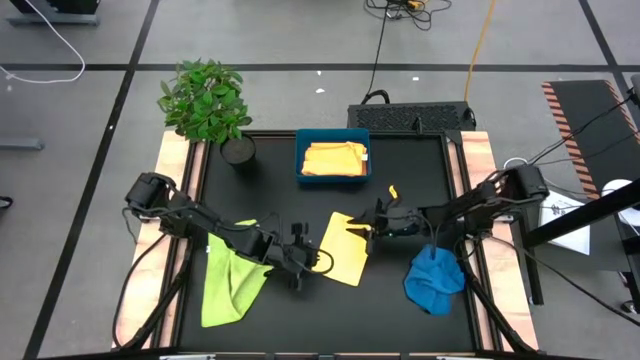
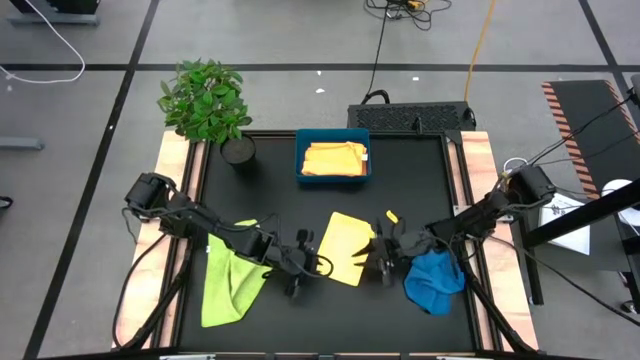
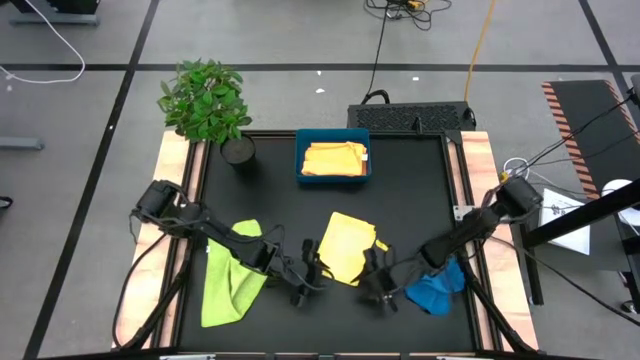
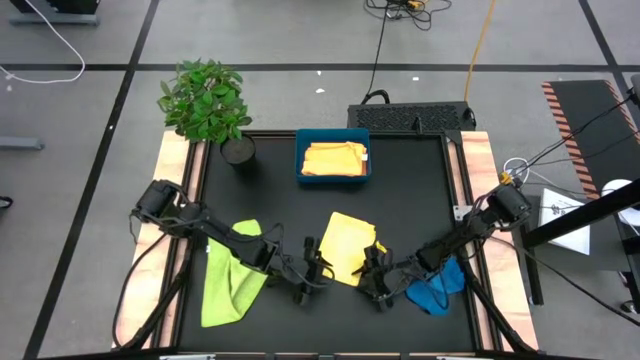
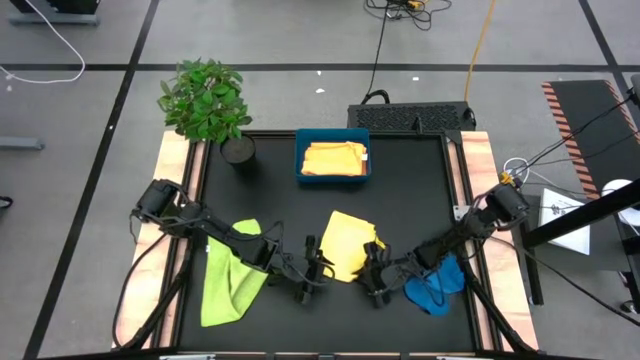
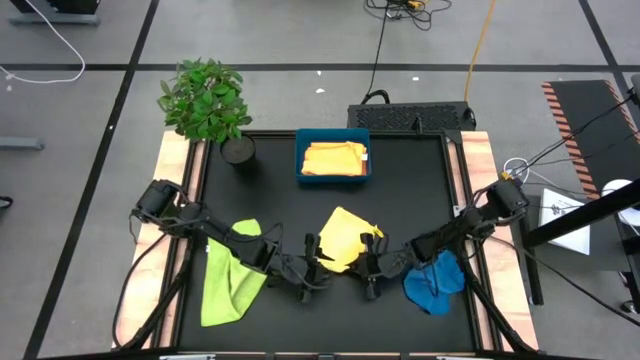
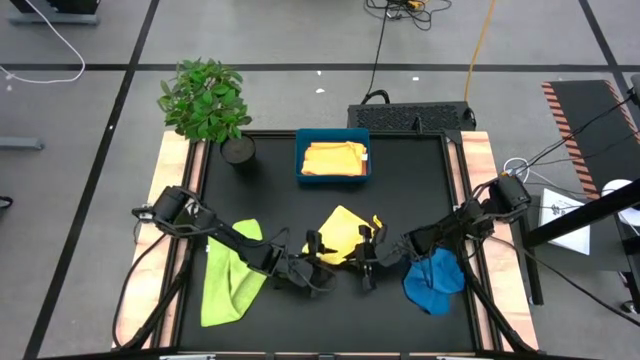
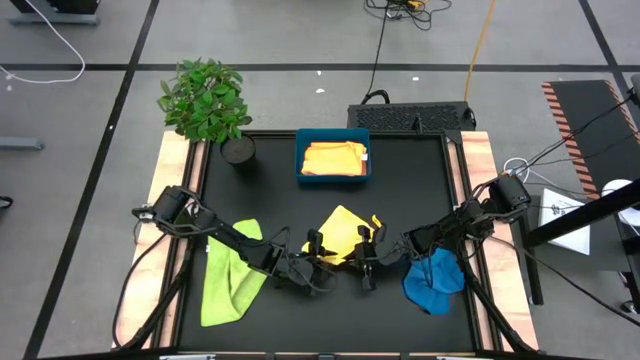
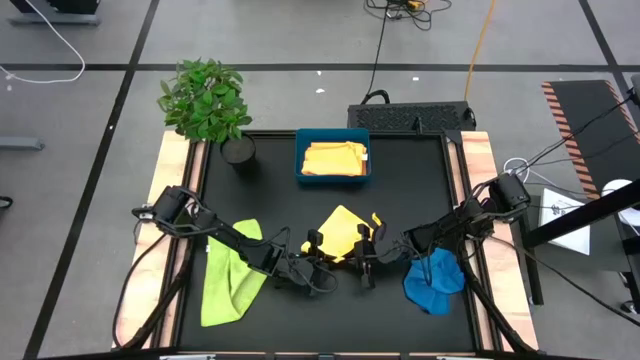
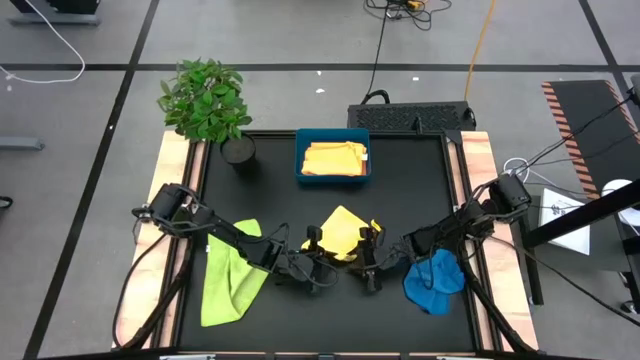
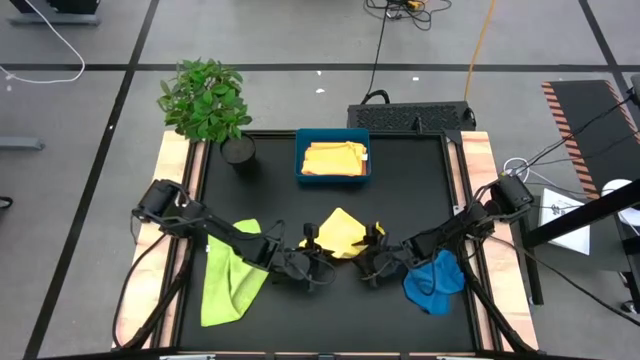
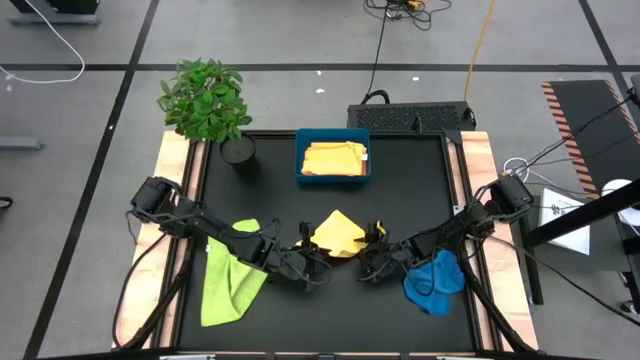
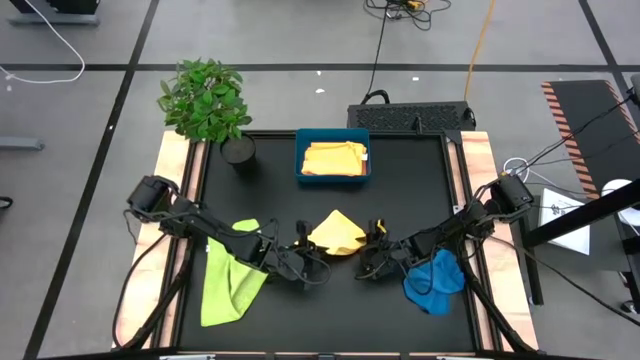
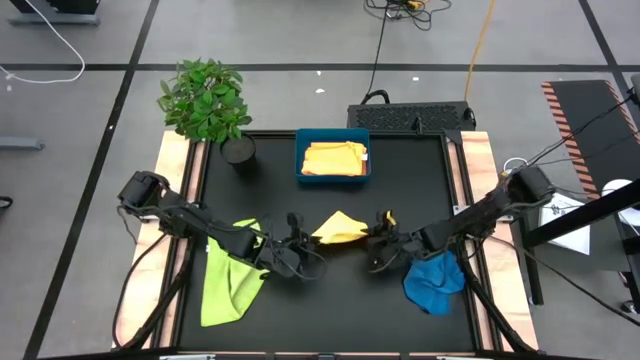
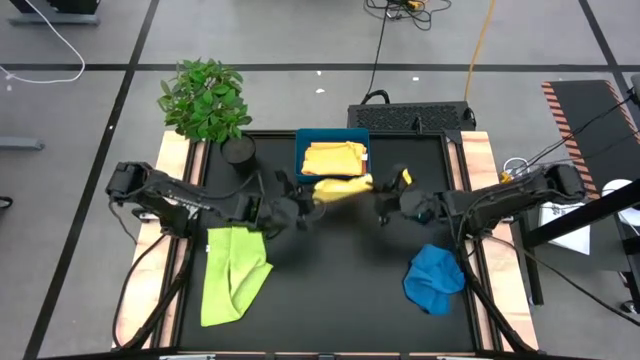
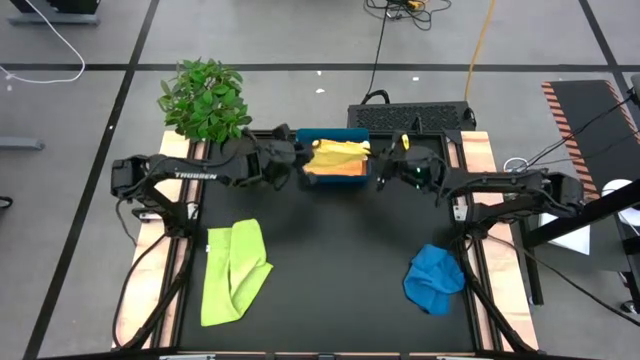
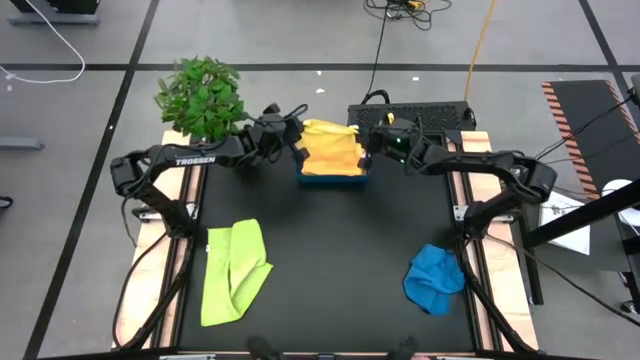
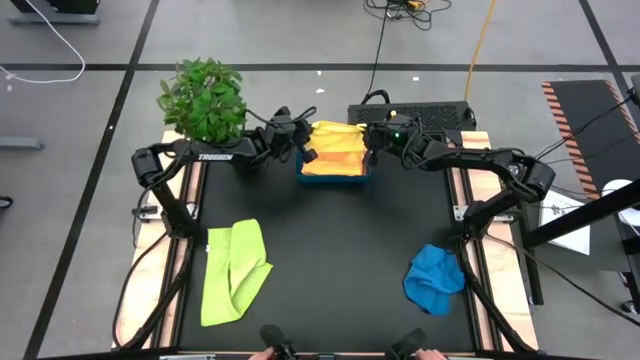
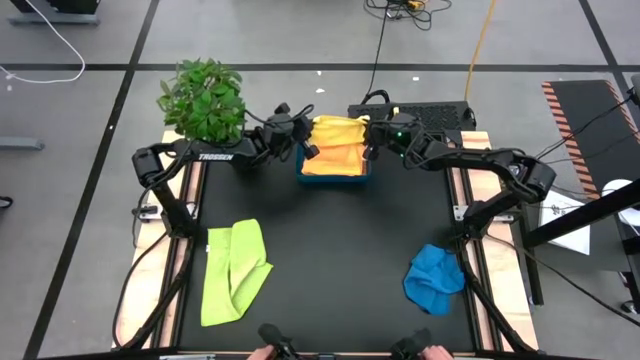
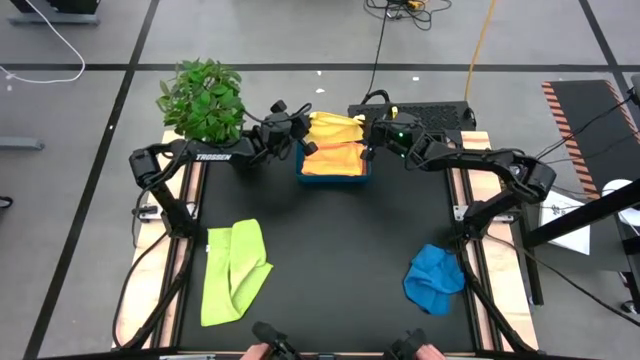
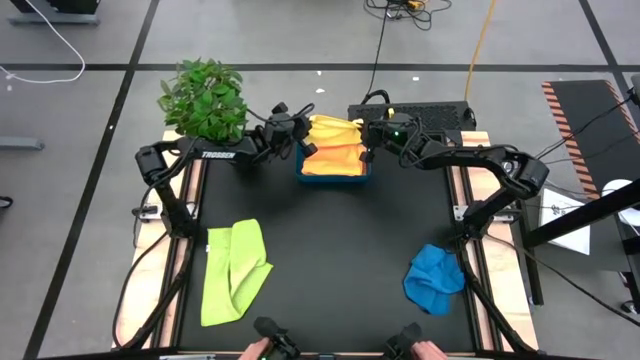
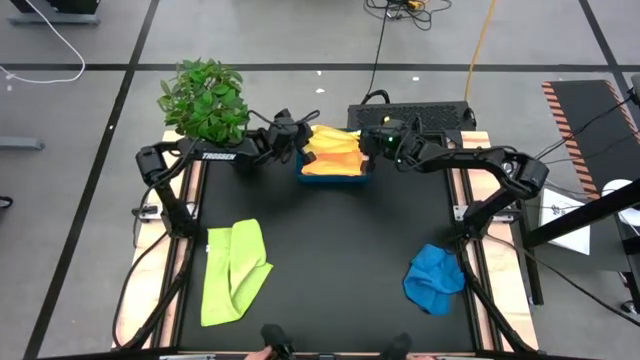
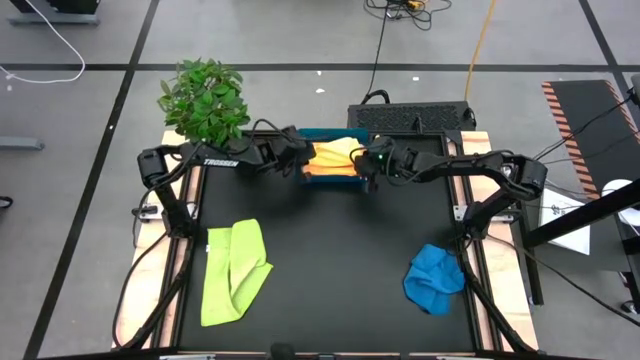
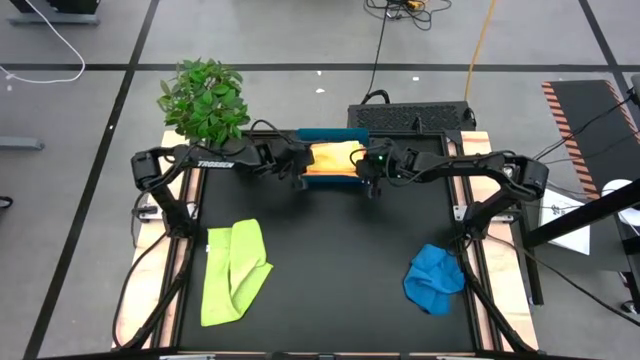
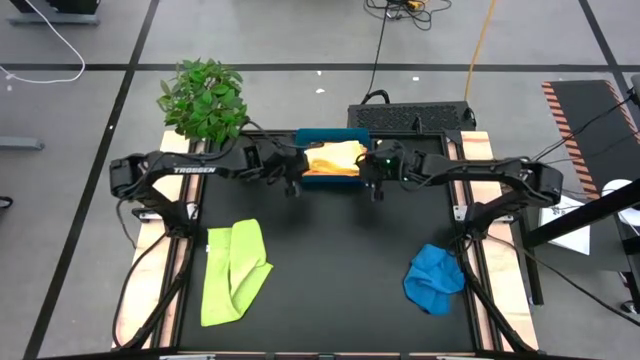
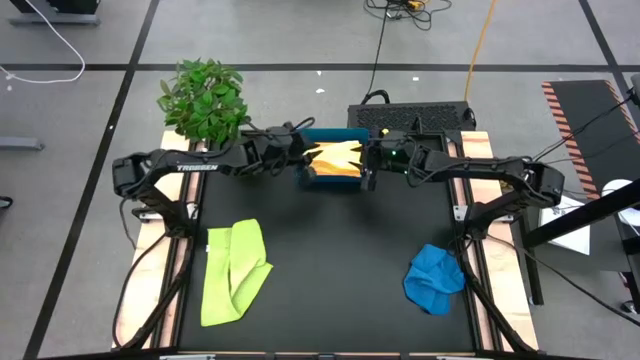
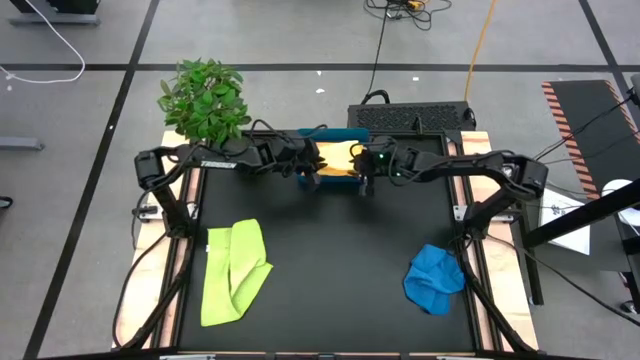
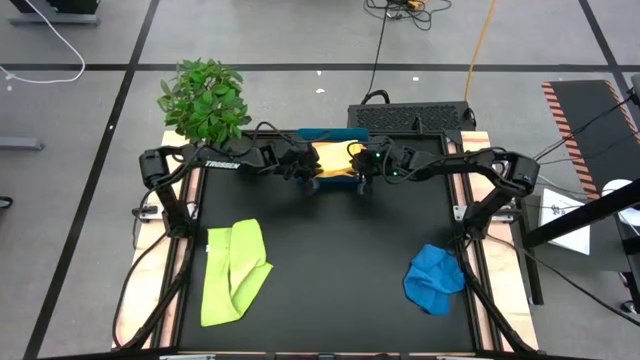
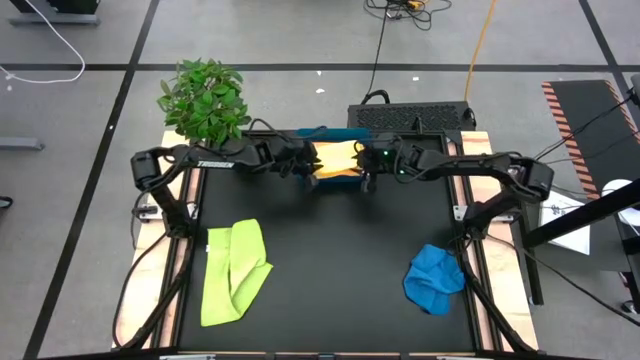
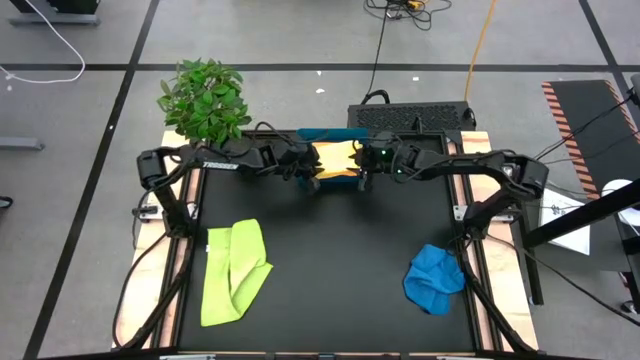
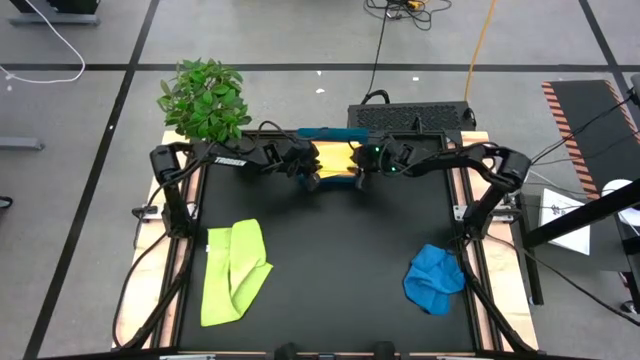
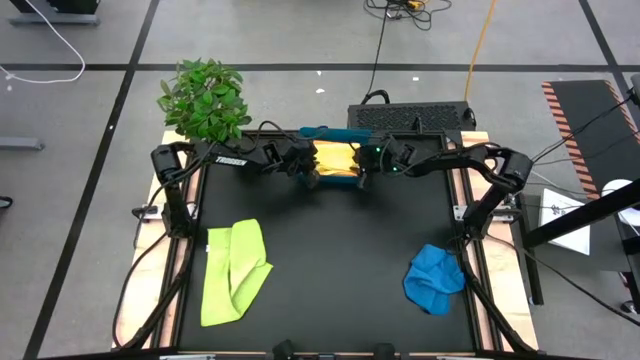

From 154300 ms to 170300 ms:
Task: Fold microfiber towels
Put the yellow microfiber towel into the blue blue bin

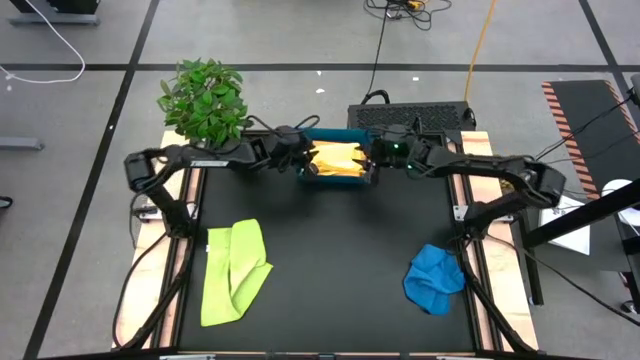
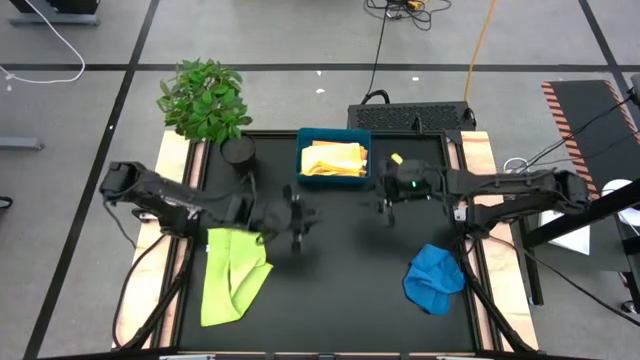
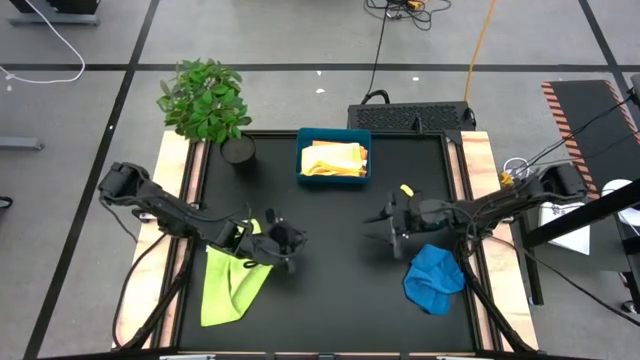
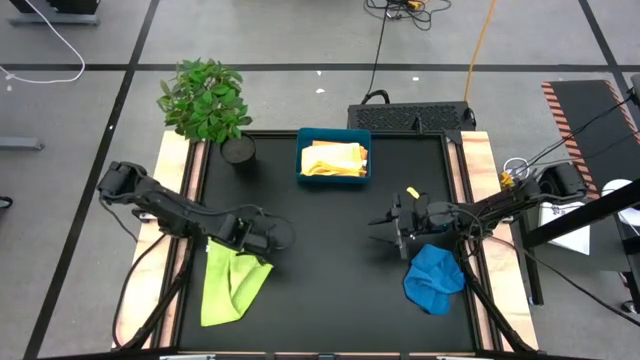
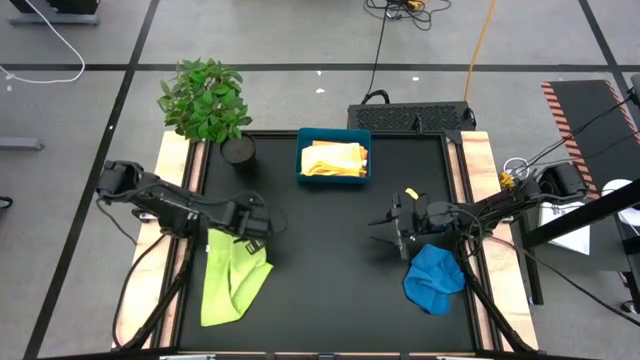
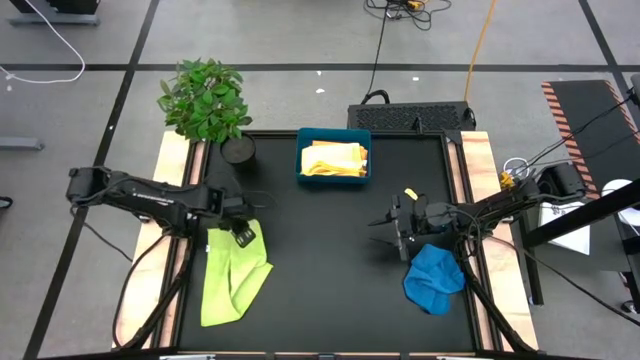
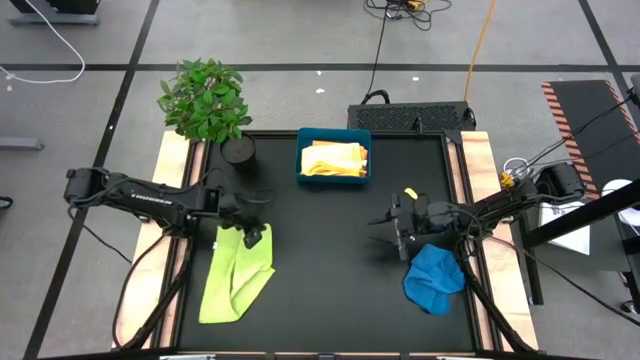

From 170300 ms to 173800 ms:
Fold the green microfiber towel

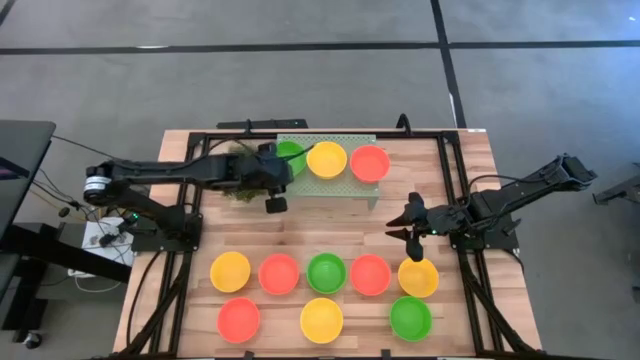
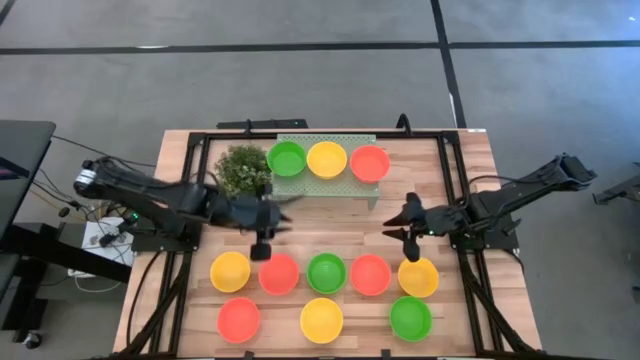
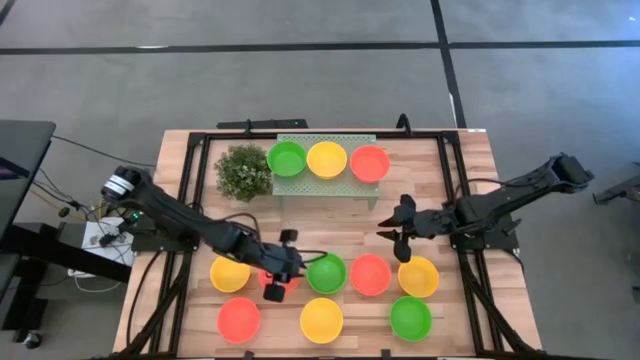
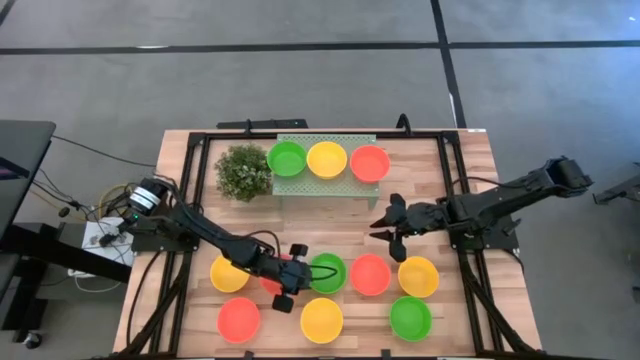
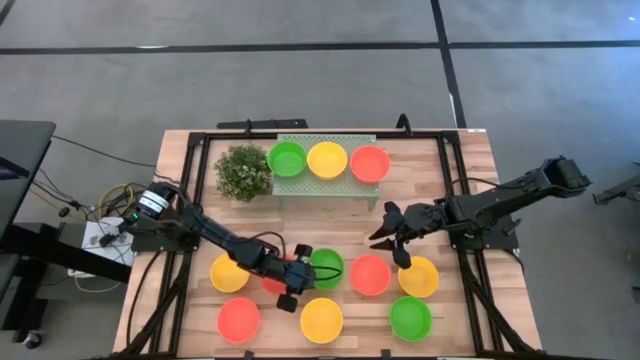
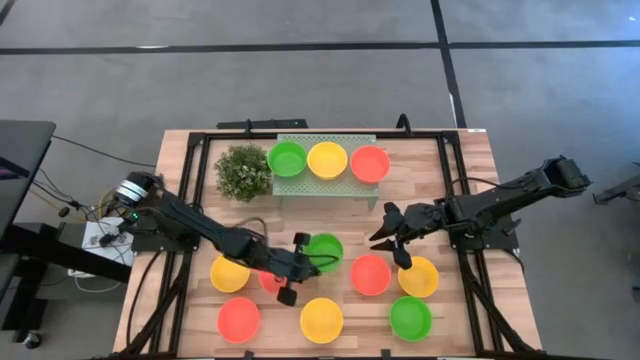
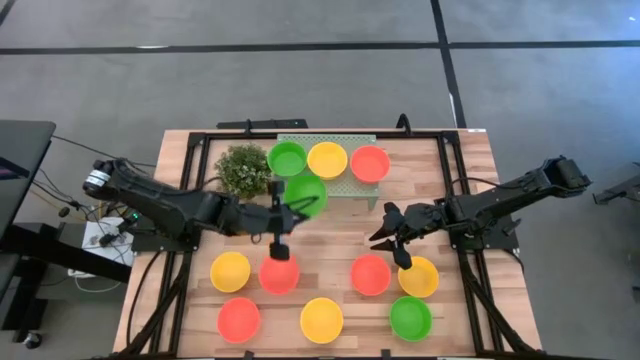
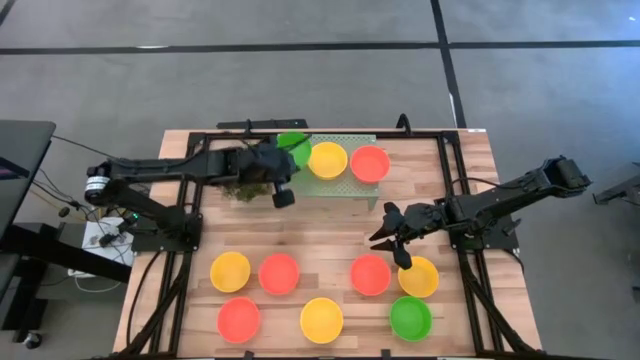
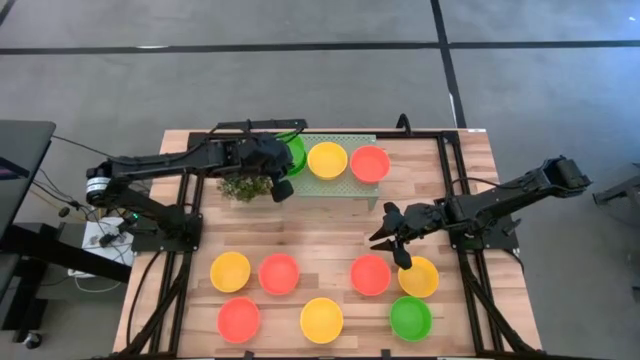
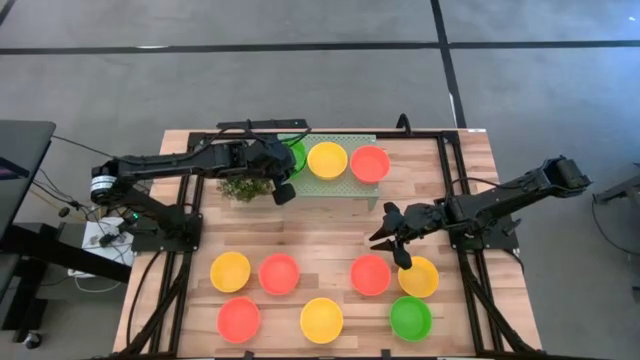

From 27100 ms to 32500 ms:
Task: Pick & Place Mini bowls
Stack the green bowl on the green bowl on the shelf
